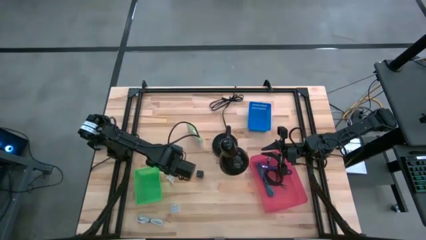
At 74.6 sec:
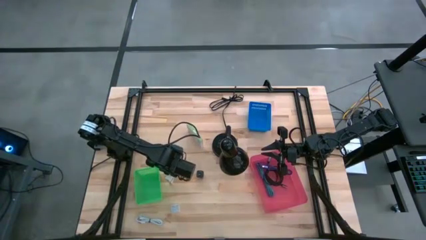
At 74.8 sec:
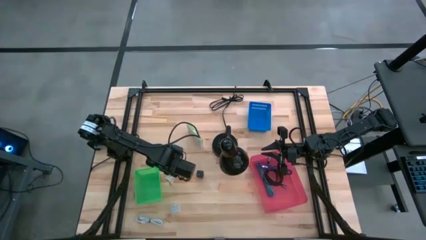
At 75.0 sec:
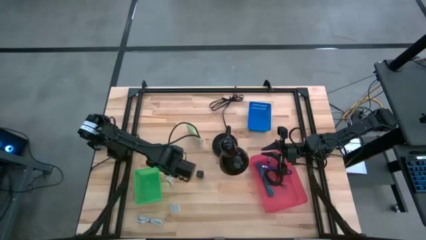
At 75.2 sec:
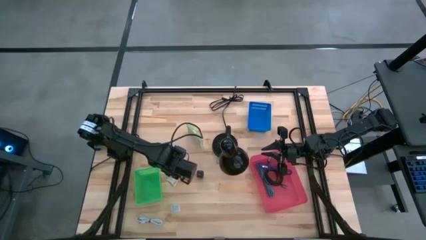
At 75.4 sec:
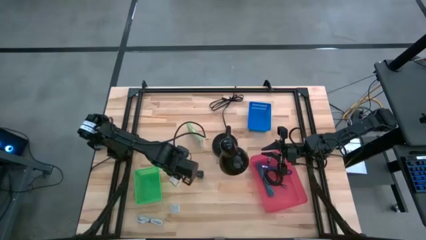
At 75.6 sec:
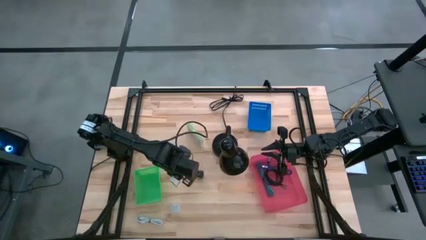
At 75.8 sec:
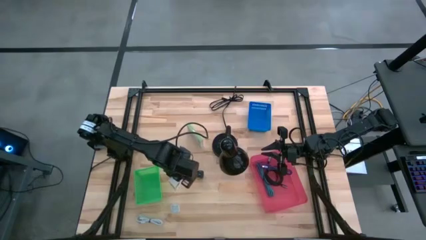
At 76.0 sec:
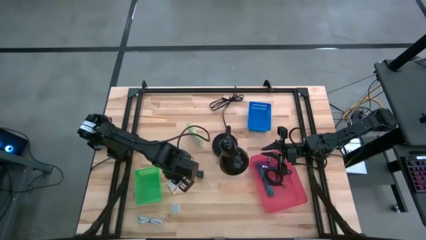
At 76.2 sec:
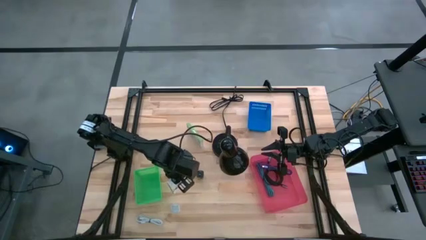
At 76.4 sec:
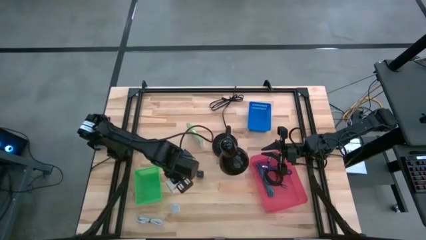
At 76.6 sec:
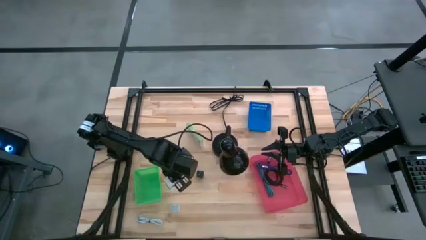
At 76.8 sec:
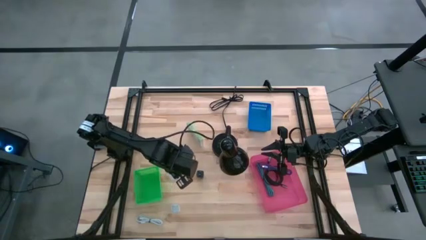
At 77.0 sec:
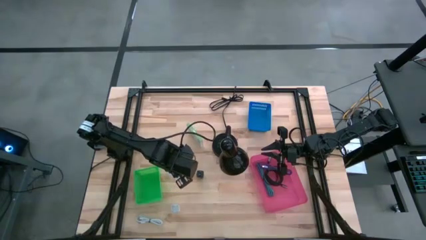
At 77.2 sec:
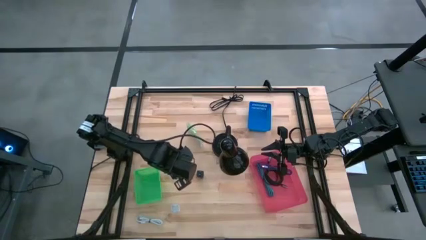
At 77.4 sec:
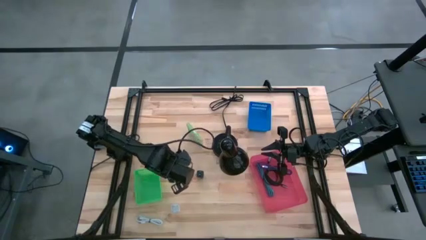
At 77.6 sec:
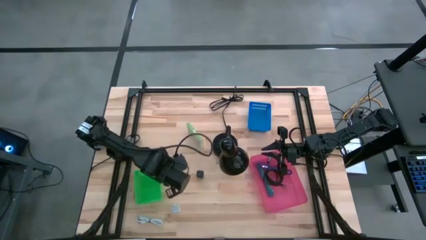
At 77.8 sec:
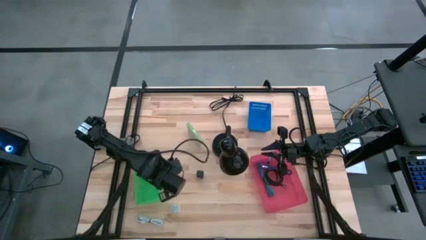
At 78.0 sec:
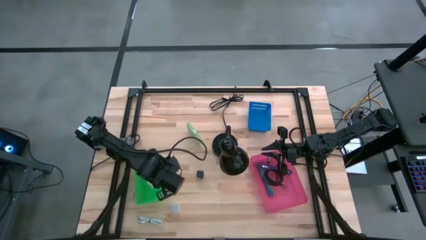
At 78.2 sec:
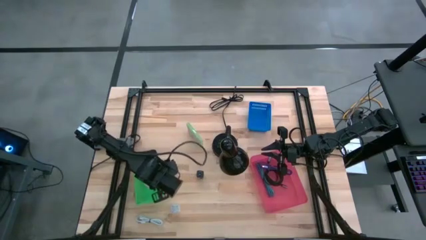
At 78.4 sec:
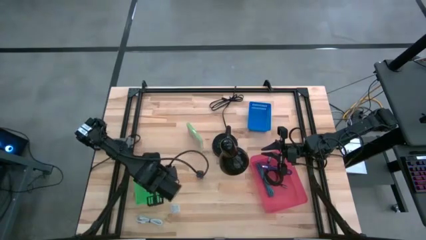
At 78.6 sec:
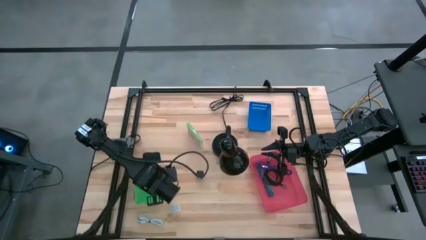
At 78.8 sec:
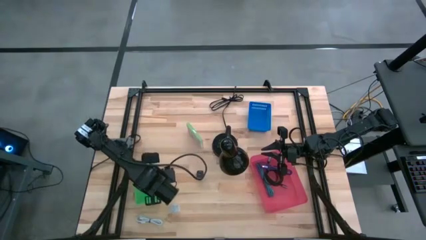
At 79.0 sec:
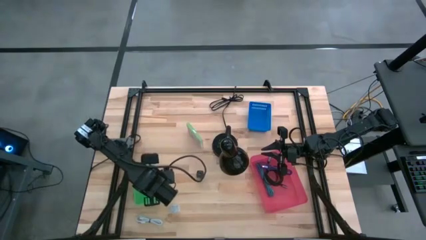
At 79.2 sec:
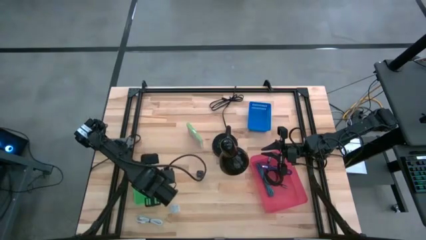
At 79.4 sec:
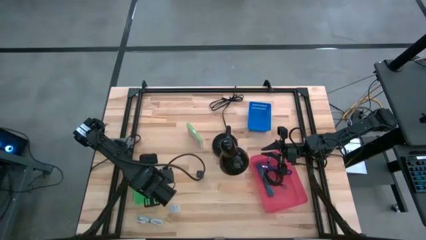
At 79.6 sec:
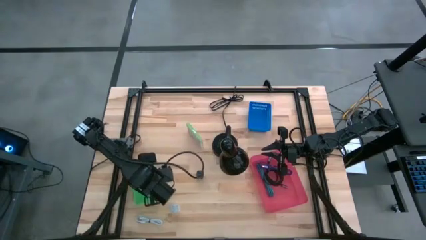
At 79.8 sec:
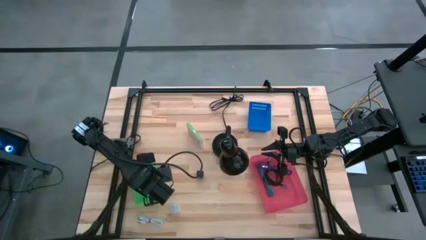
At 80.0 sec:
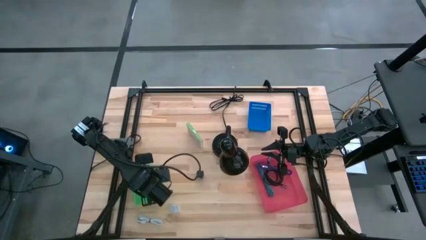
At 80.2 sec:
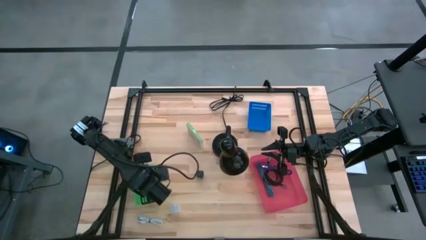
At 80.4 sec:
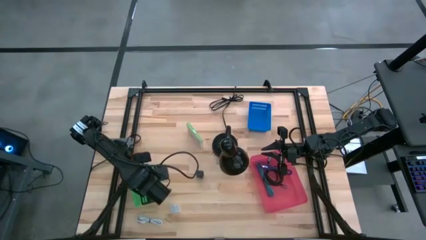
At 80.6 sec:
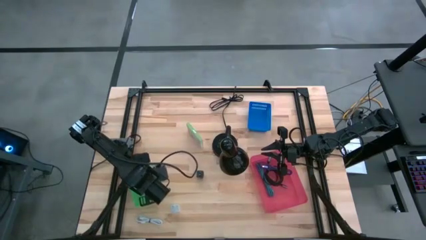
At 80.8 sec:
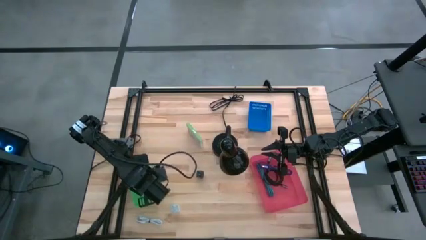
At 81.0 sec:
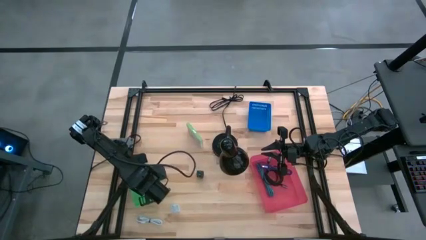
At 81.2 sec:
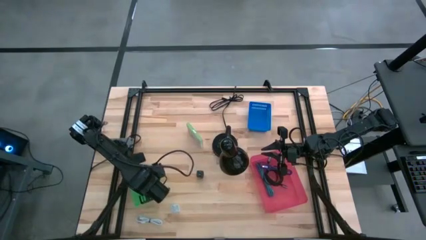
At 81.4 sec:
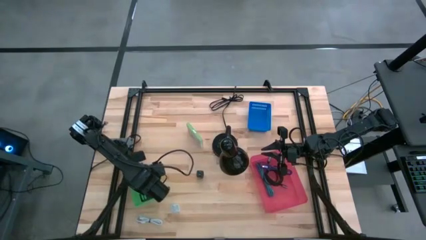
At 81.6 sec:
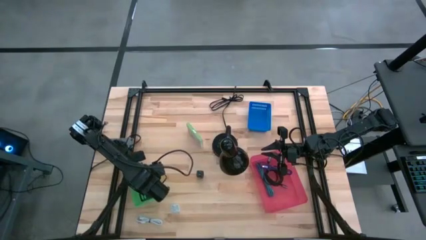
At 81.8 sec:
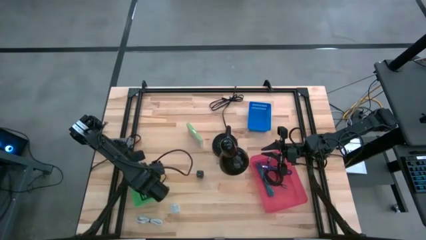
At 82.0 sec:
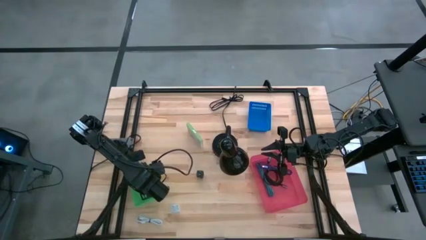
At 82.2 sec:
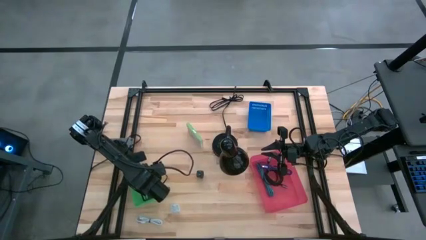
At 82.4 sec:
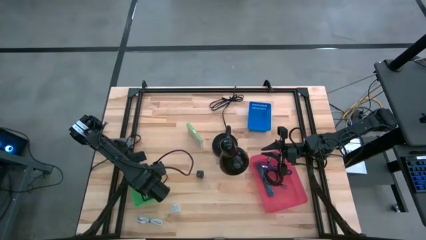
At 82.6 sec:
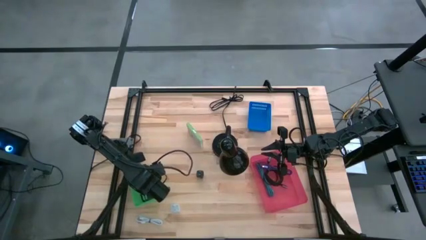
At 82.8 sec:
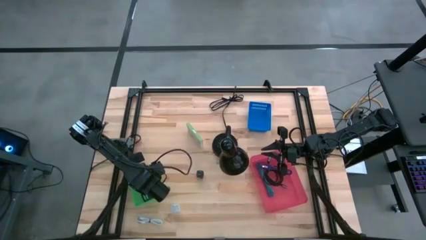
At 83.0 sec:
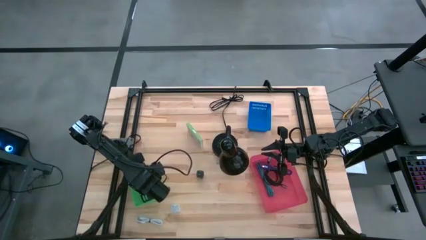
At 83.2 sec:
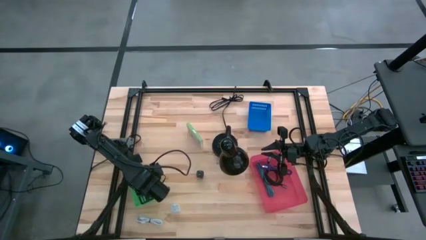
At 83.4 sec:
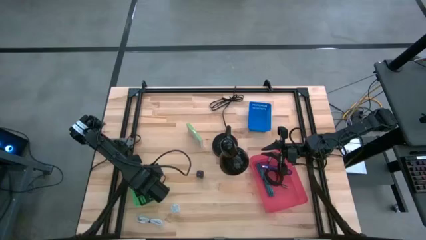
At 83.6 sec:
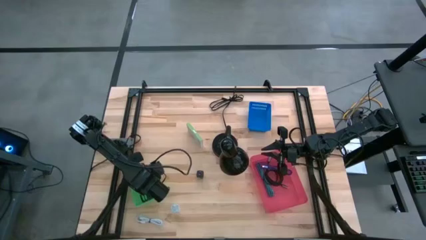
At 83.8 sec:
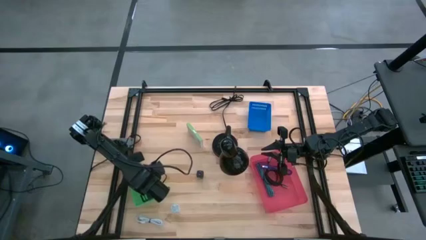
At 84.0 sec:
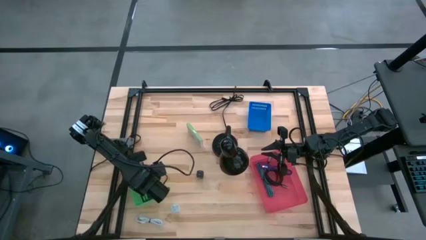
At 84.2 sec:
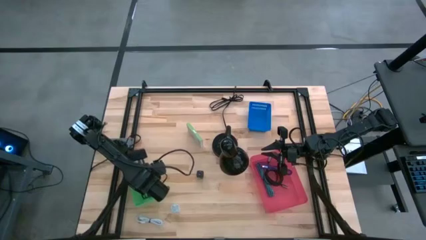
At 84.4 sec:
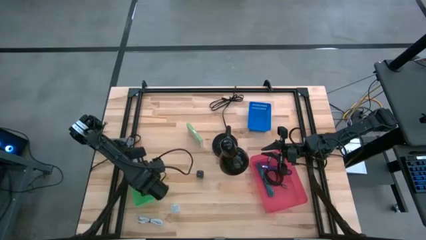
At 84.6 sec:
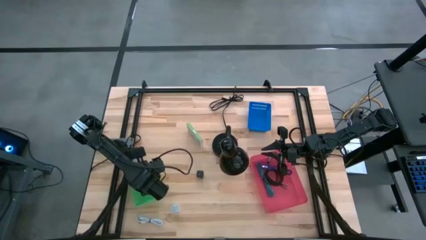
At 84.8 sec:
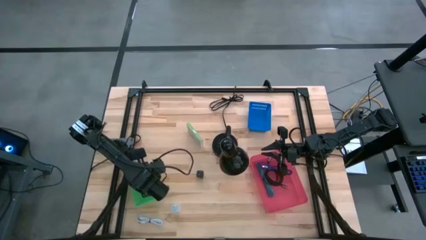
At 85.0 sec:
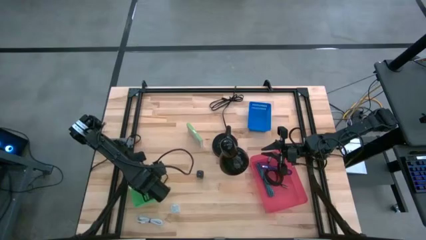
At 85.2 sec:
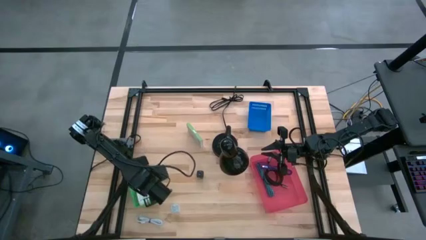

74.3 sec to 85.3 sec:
Task: Pick and place items into bin
Put the bottom white card reader box into the green bin

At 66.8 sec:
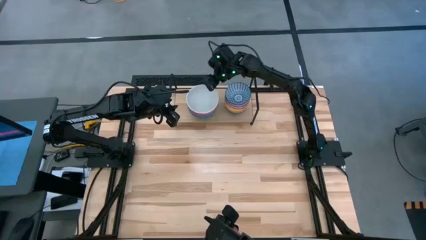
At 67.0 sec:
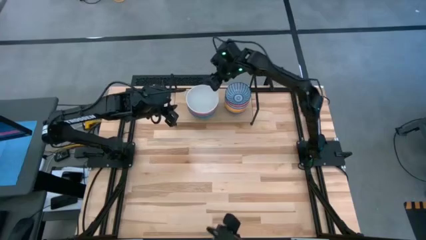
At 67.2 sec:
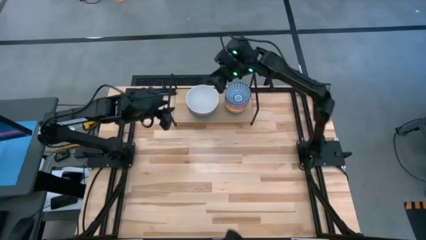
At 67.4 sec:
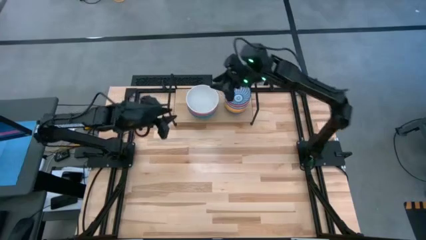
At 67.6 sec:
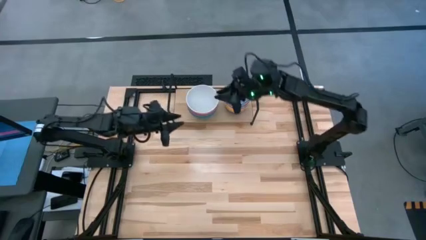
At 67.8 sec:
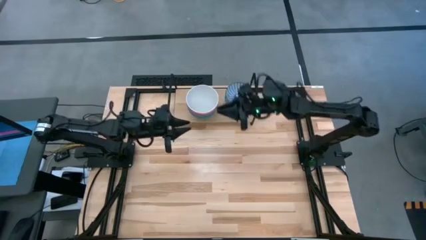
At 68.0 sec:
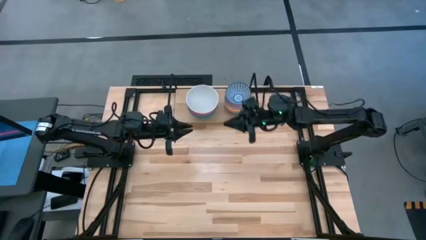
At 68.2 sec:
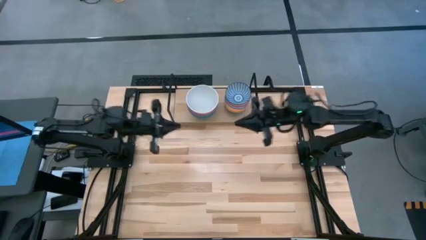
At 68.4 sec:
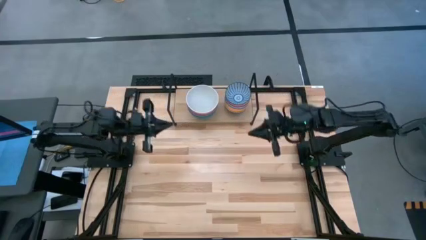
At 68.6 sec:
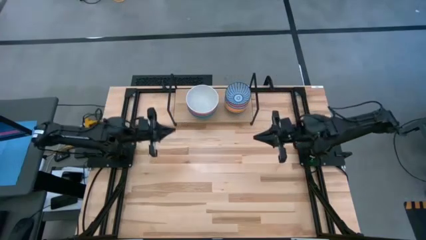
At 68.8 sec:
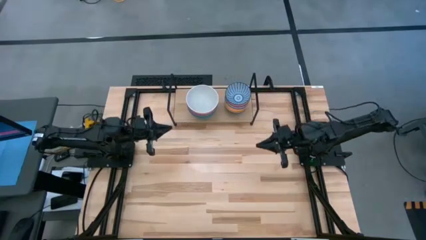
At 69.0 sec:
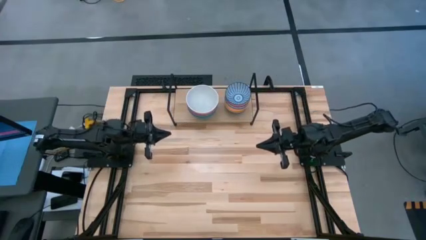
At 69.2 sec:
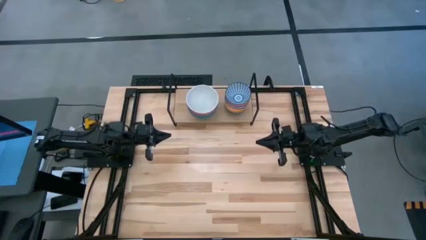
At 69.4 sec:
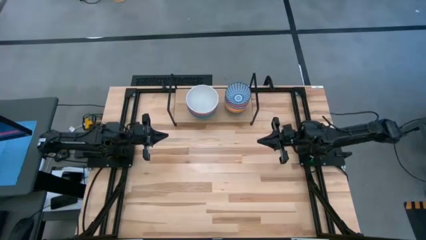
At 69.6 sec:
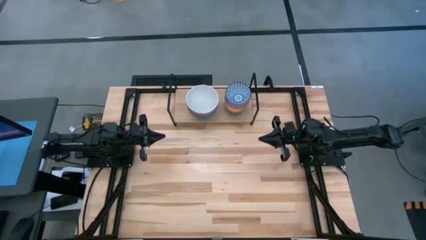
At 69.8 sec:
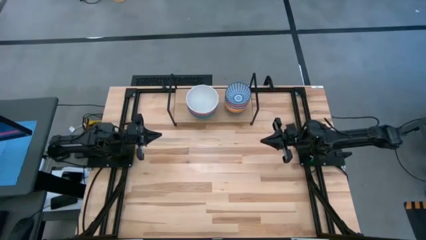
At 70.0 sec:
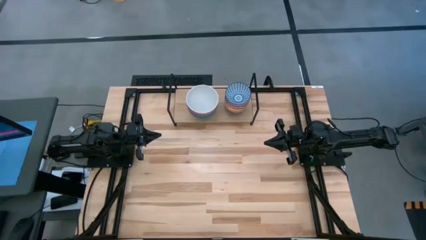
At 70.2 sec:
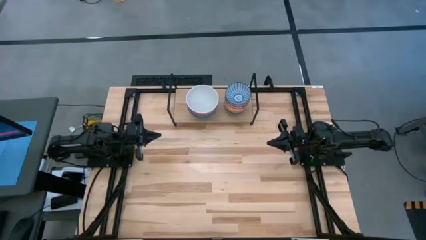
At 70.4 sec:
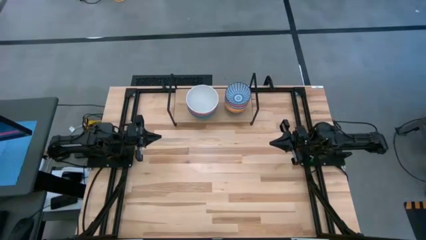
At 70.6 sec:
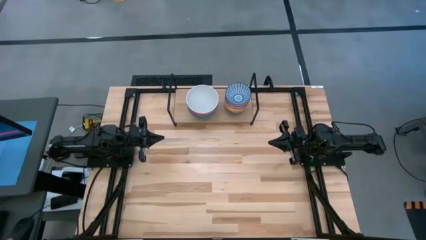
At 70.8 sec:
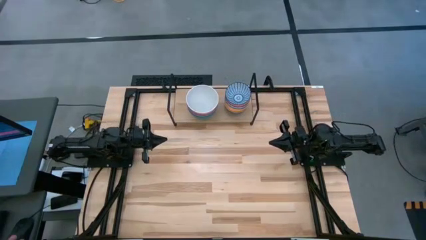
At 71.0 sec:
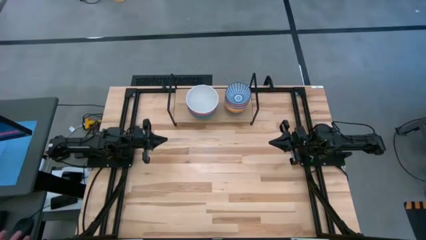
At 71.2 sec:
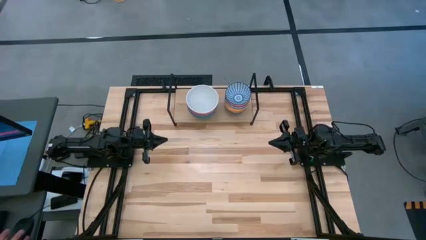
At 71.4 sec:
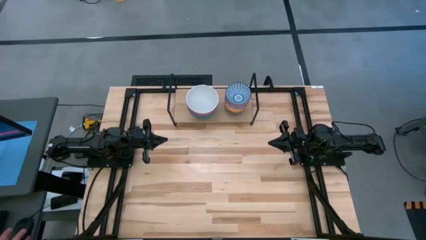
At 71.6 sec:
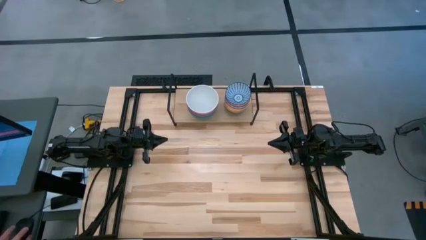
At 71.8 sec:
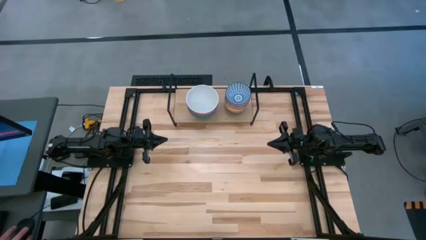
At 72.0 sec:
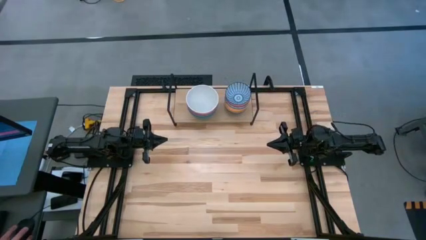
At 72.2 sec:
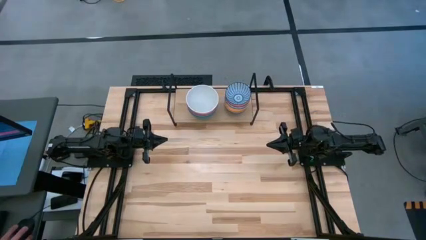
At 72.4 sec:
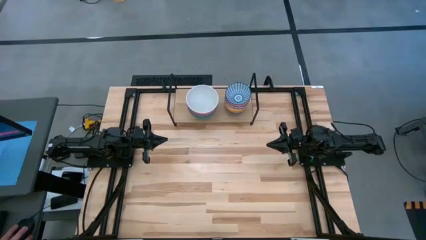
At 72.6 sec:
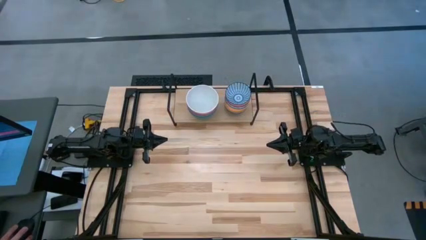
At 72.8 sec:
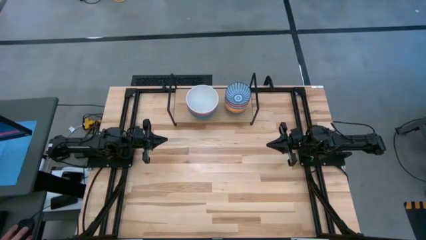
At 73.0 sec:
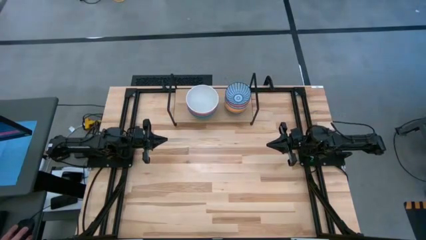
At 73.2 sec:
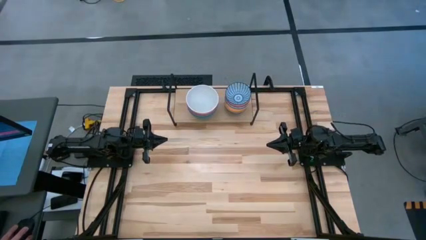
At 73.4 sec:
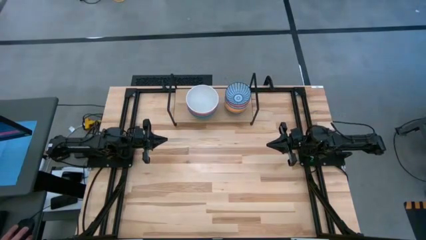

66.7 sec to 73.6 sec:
Task: Place and stack bowls onto a shelf
Return to Home Position
